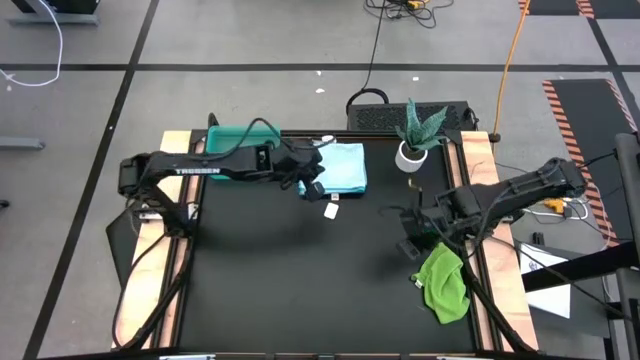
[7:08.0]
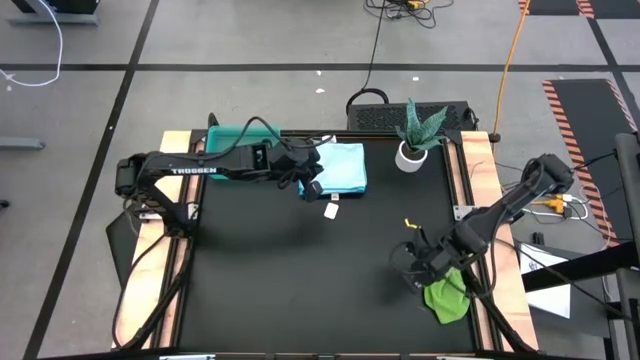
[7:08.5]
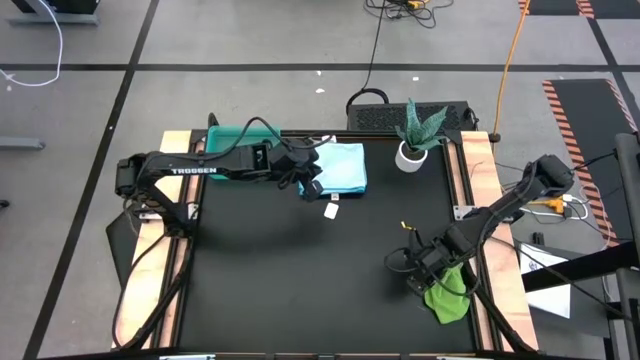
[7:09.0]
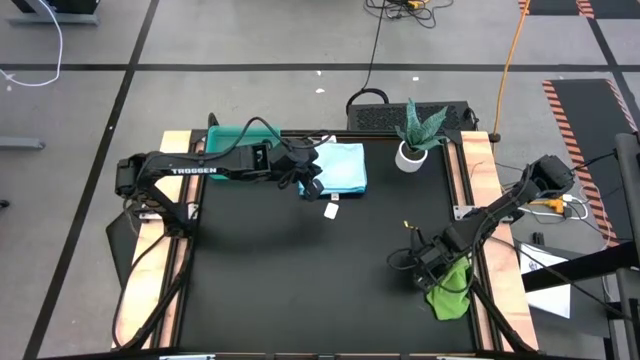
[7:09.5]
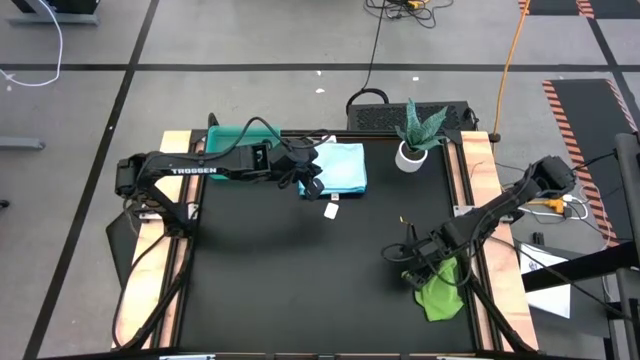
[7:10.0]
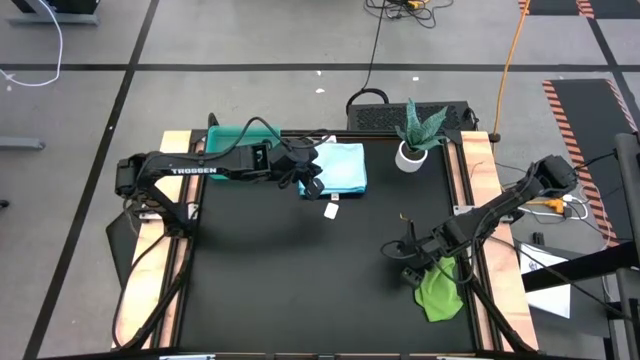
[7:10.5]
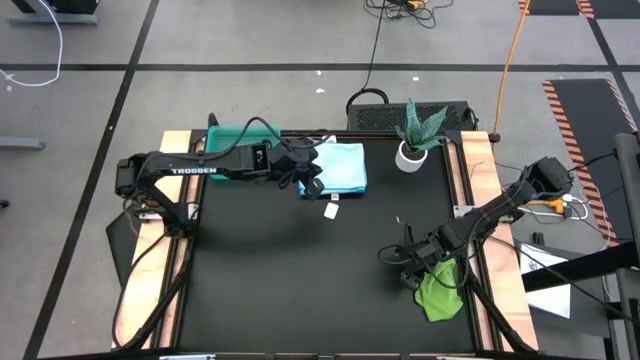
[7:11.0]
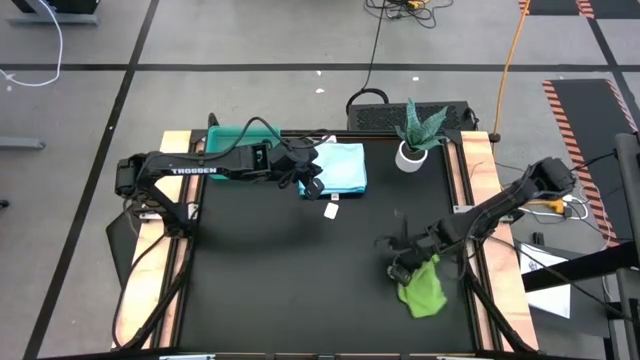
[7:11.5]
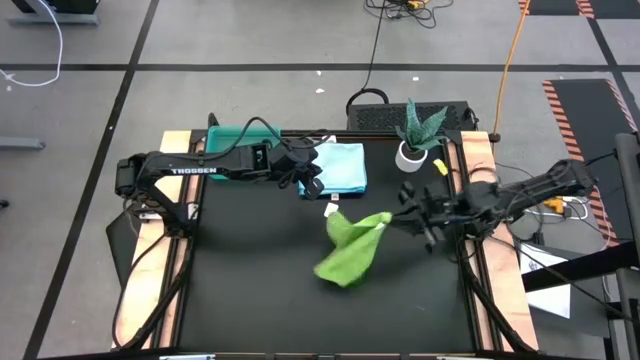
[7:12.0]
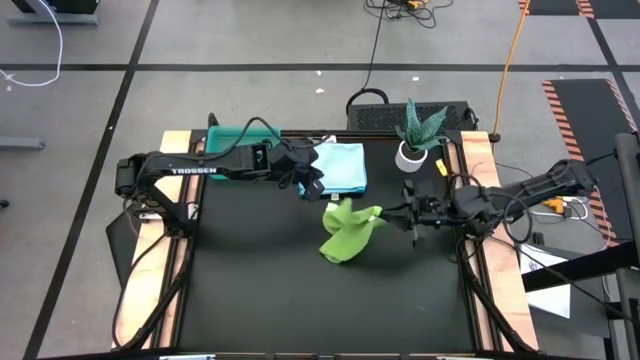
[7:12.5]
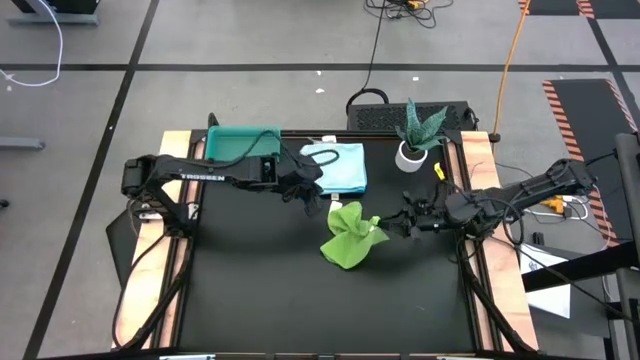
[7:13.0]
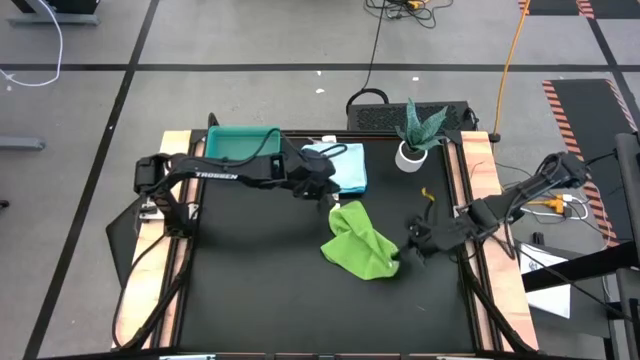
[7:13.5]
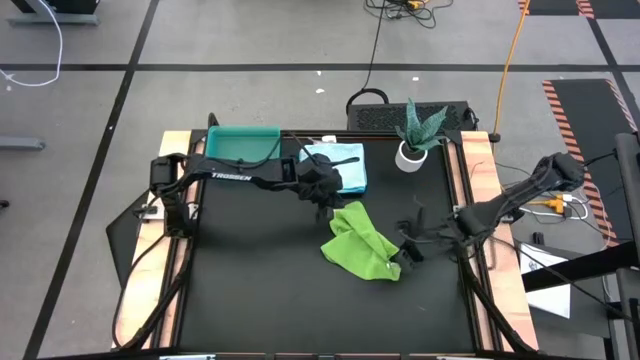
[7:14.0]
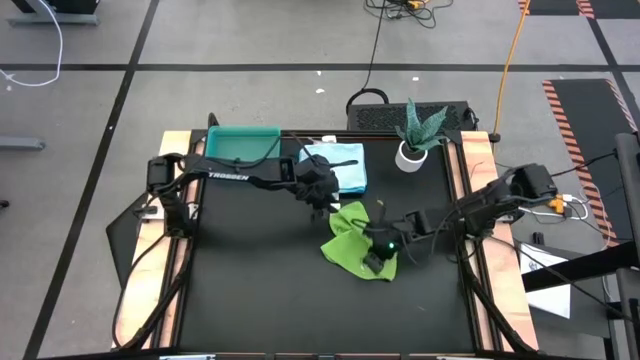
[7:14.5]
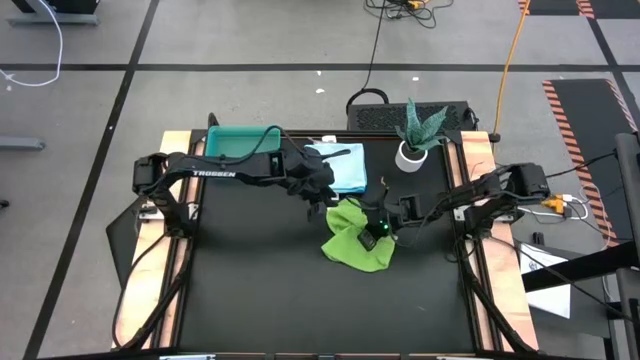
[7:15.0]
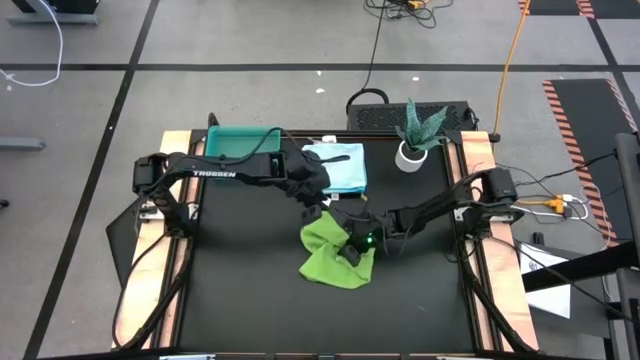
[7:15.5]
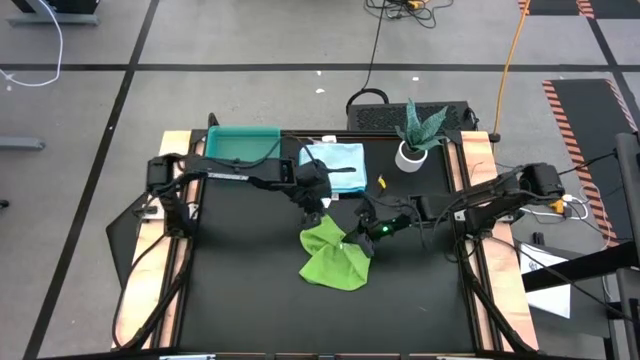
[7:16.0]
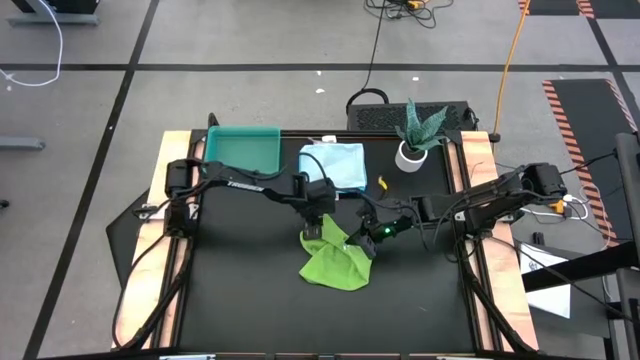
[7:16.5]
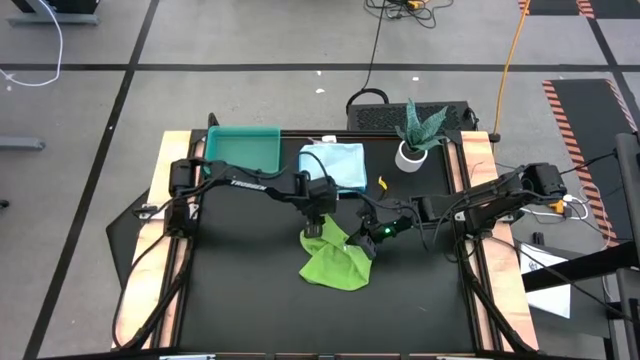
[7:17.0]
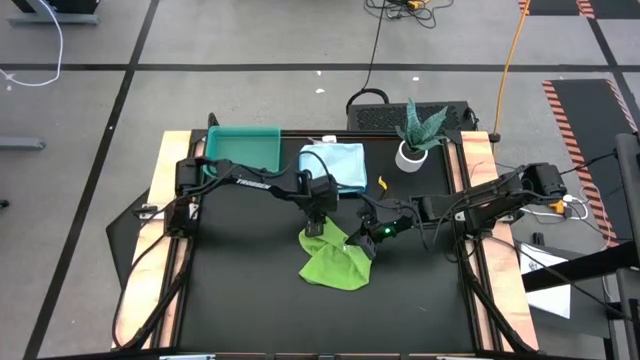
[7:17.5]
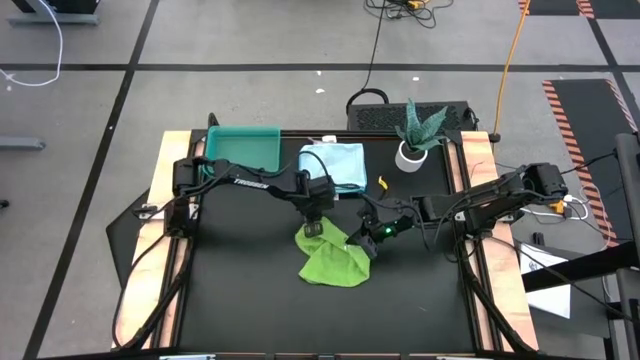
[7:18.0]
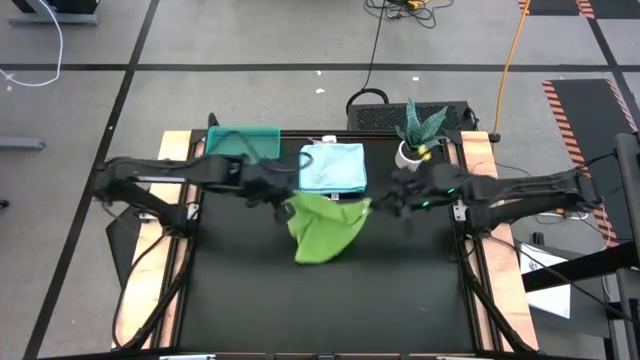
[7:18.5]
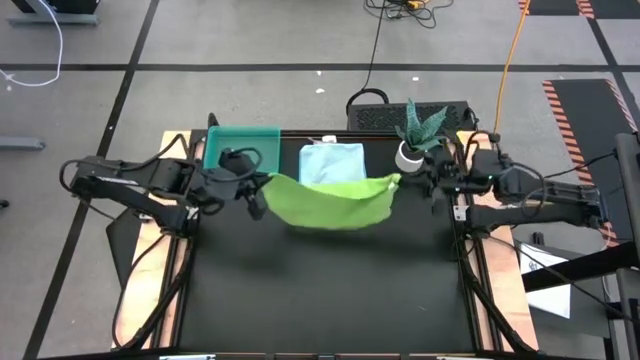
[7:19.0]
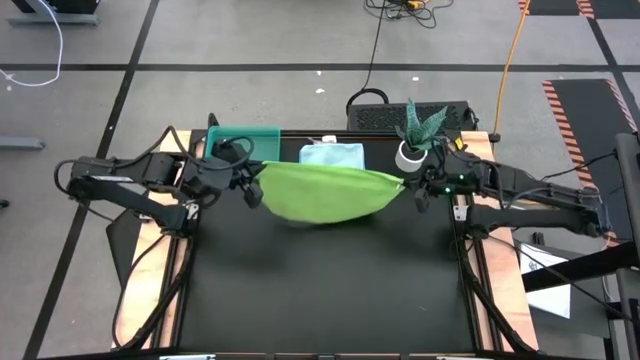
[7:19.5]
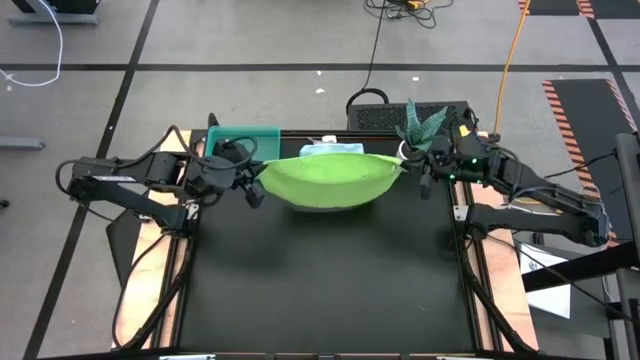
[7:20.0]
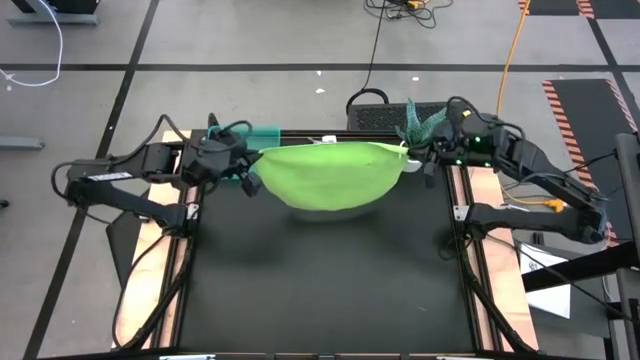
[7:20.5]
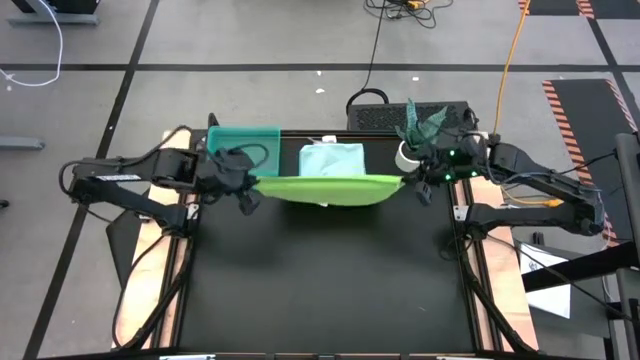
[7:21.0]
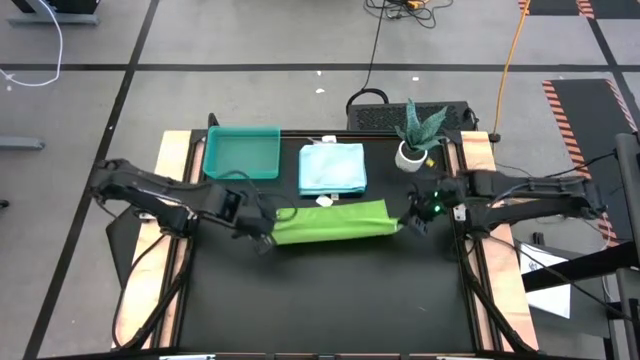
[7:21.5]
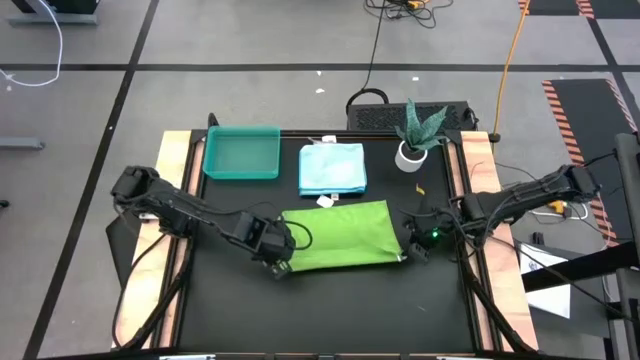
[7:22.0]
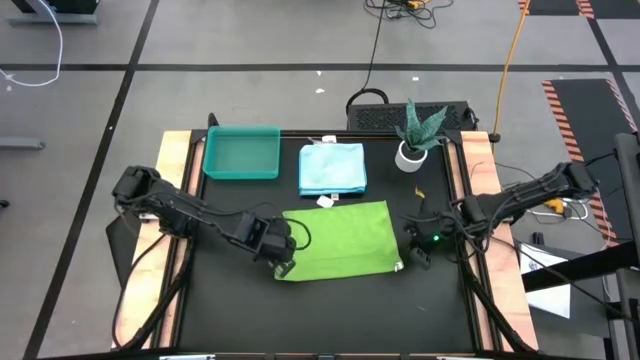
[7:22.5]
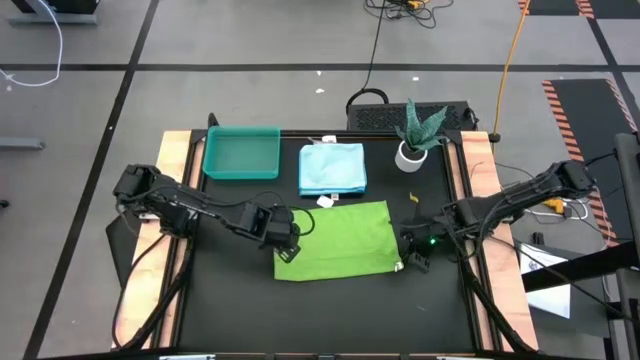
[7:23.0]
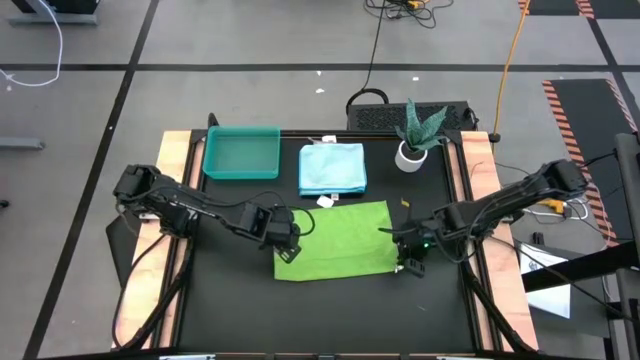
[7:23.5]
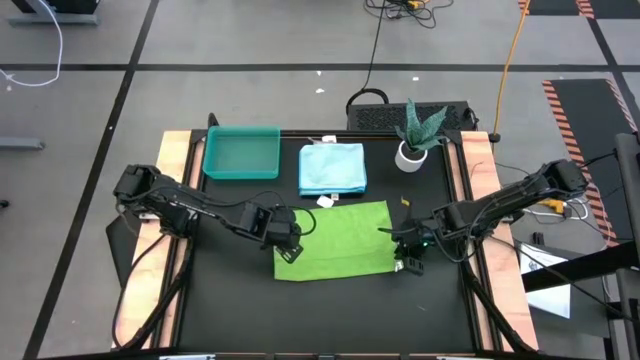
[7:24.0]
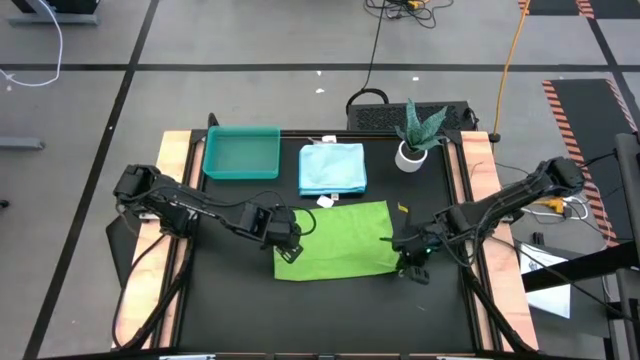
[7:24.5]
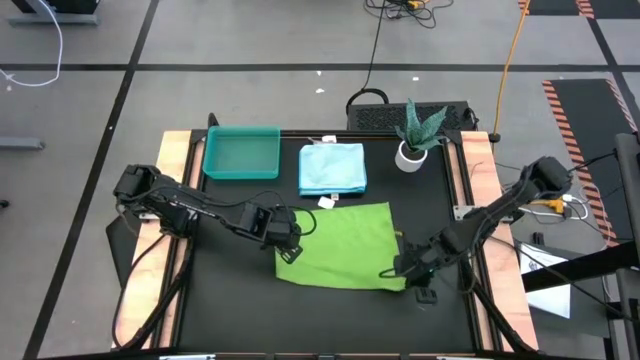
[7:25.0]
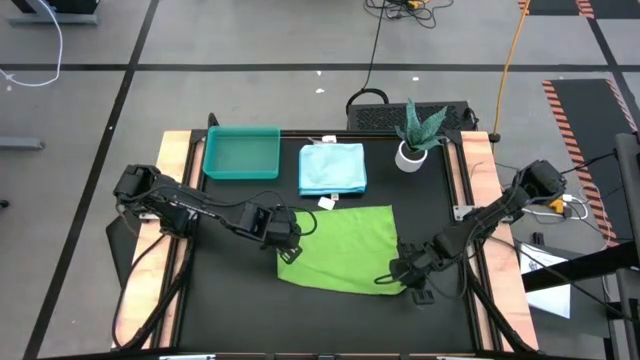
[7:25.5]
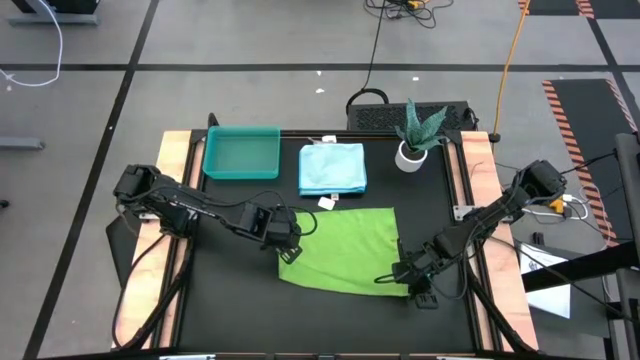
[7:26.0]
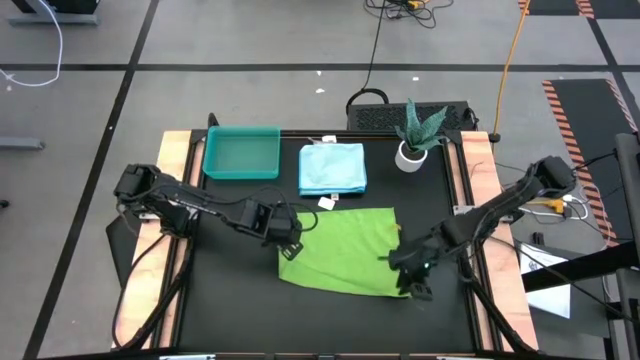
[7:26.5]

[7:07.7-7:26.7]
Task: Fold microfiber towels
Fold the green microfiber towel

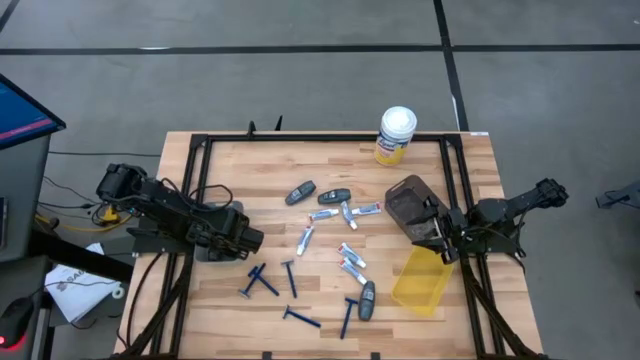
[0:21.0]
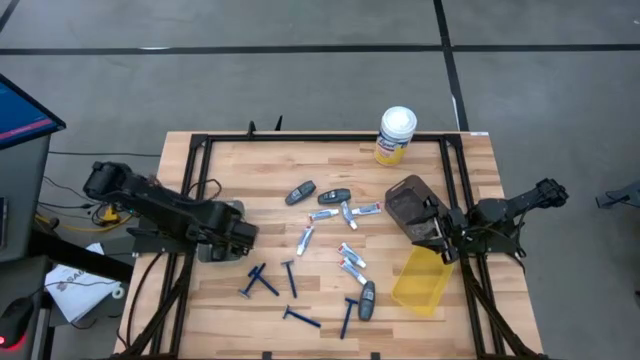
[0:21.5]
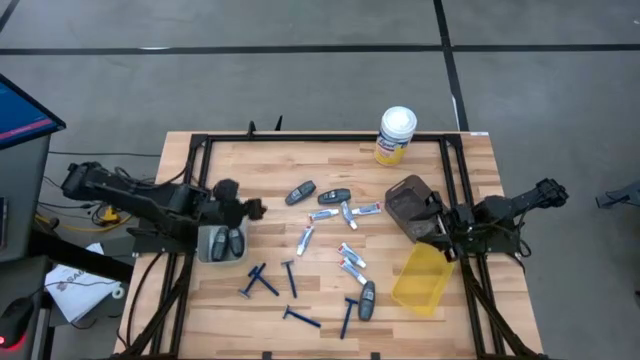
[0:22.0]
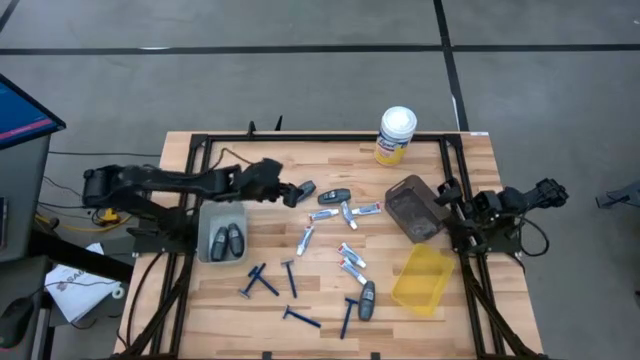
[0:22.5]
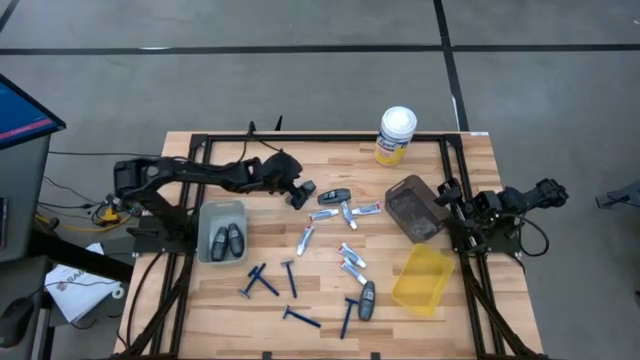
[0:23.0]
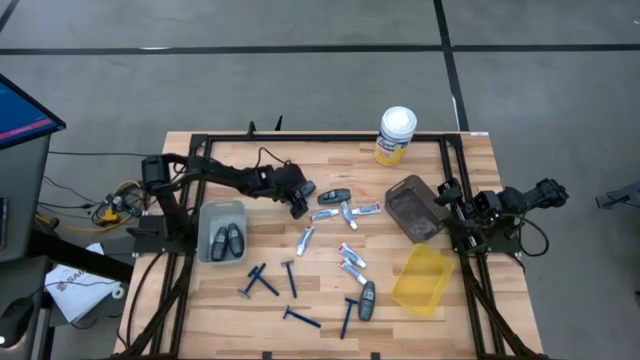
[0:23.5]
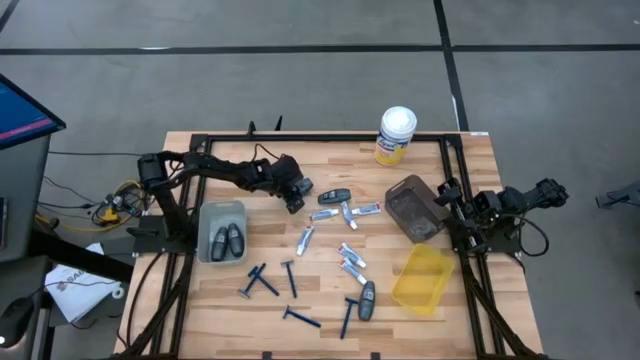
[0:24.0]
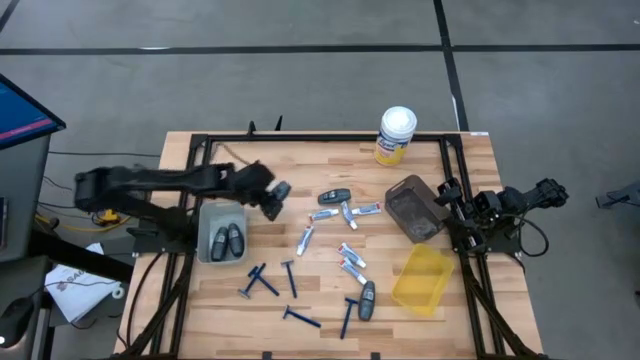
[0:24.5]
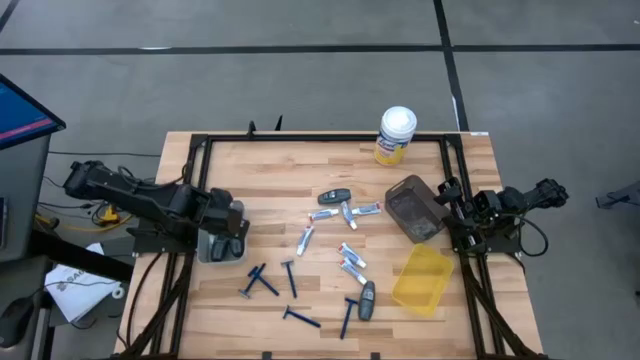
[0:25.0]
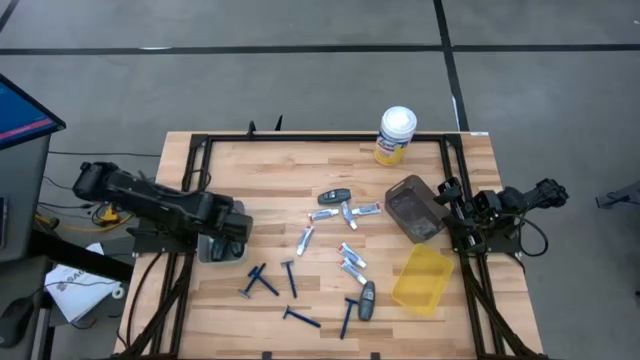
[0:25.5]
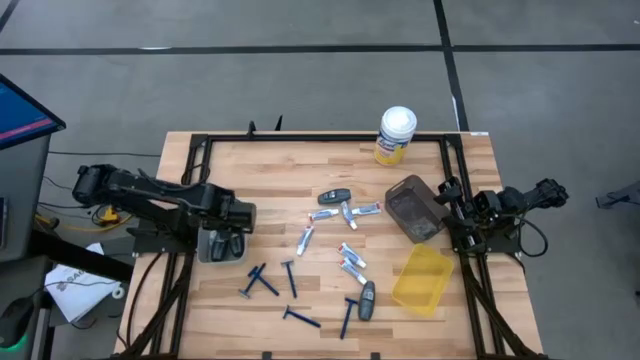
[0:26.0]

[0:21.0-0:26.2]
Task: Pick & Place Travel size toiletries
Put the gray deodorant into the gray bin
